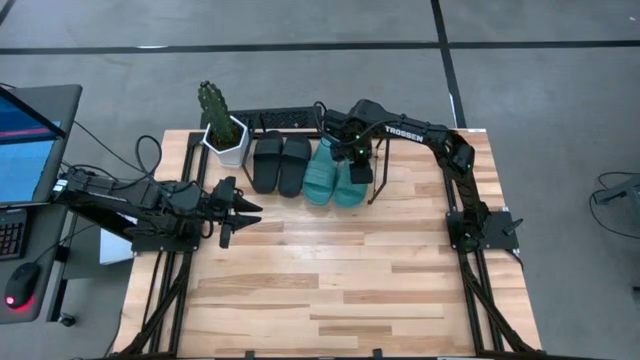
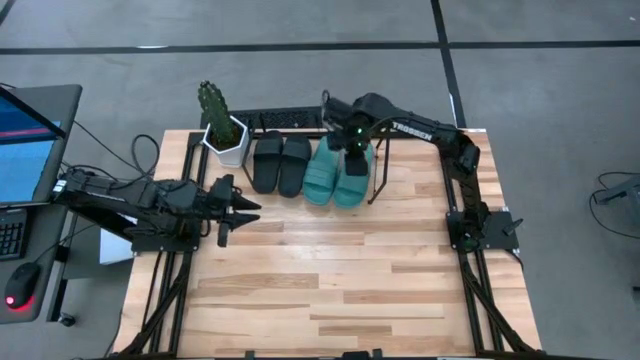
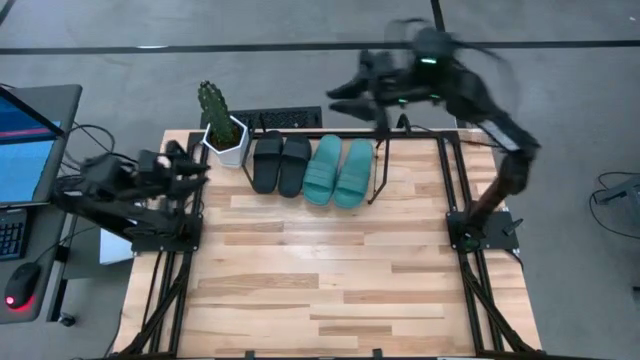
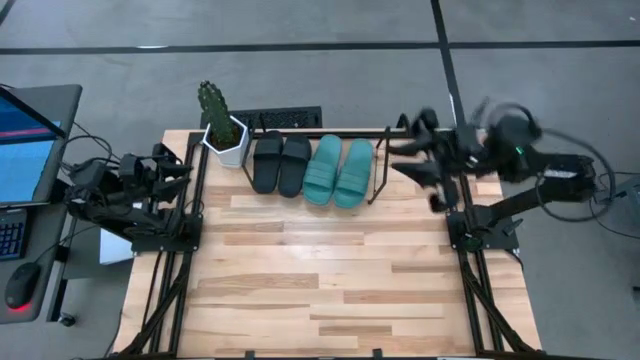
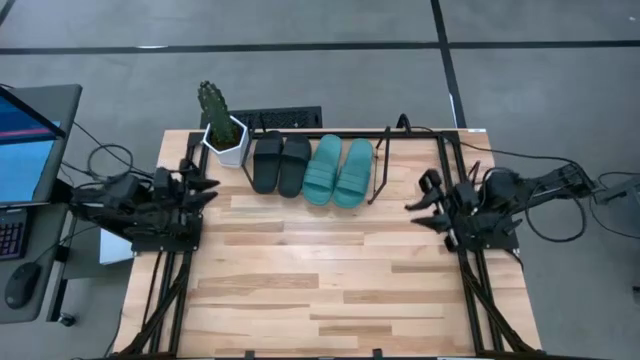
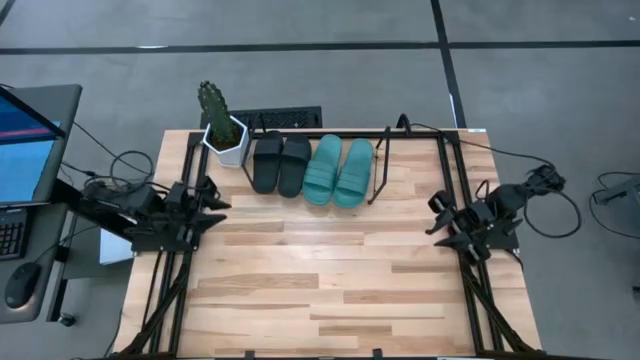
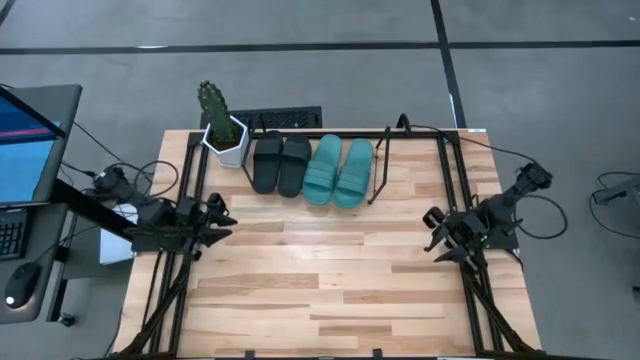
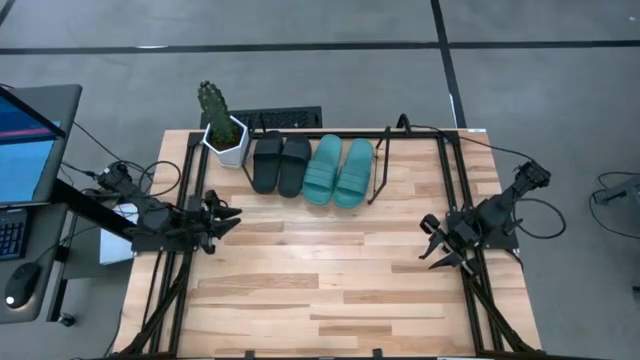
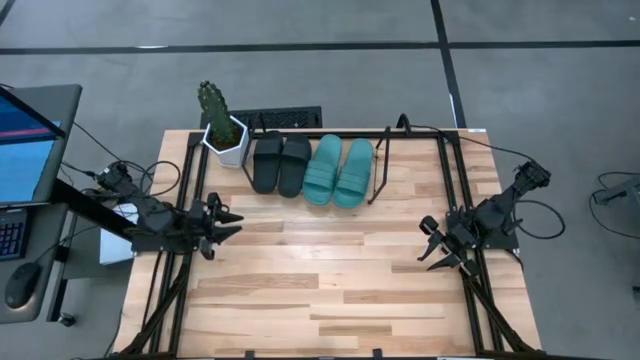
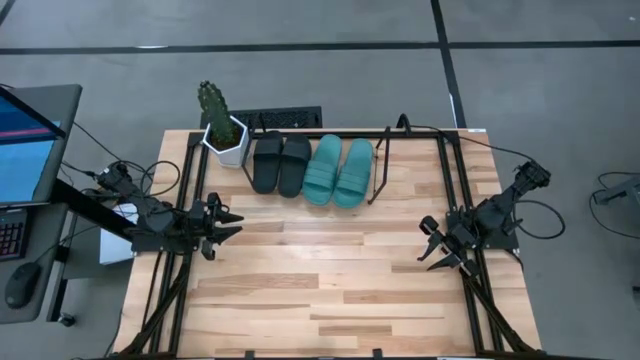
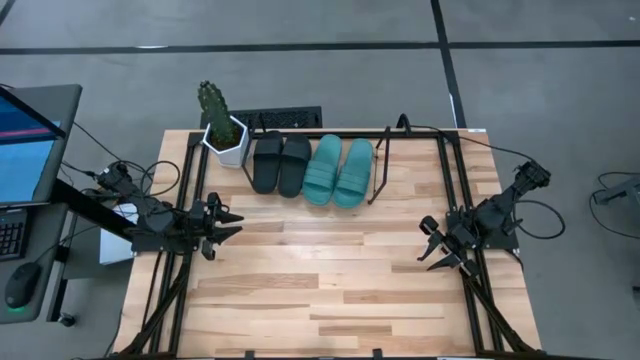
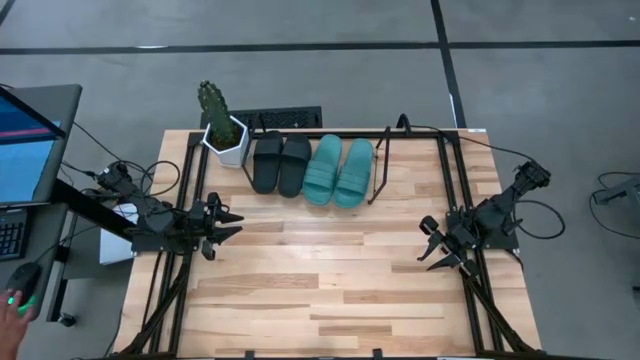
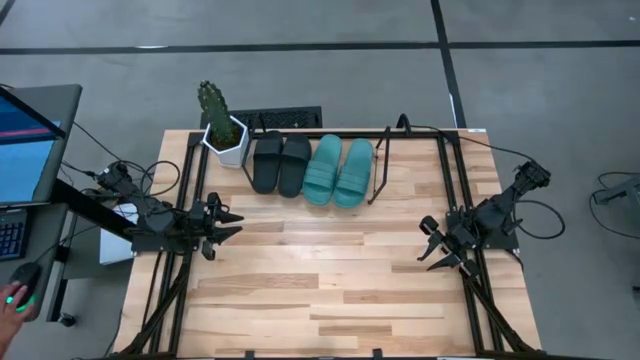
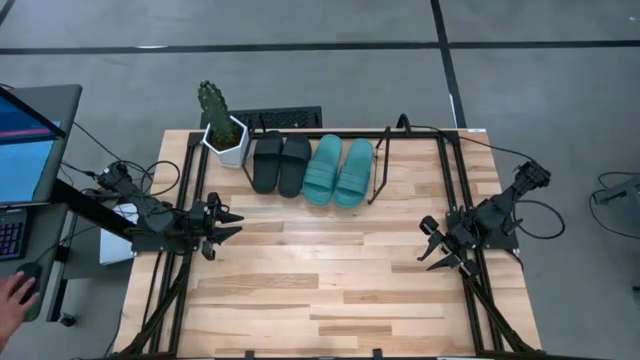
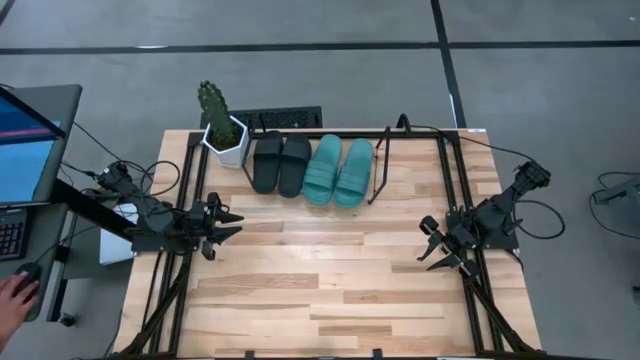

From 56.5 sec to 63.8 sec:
Task: Pick and place slides into the shelf
Return to Home Position

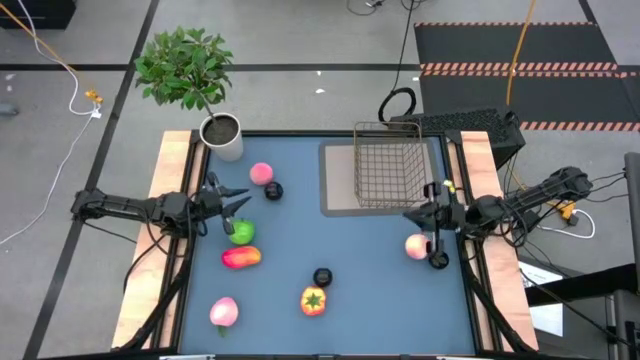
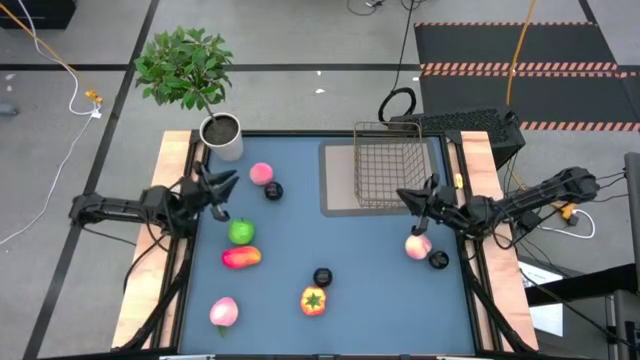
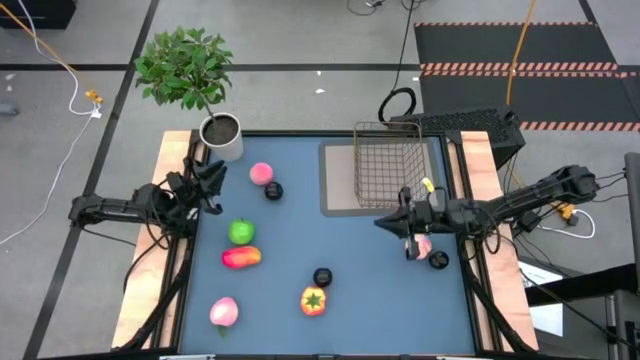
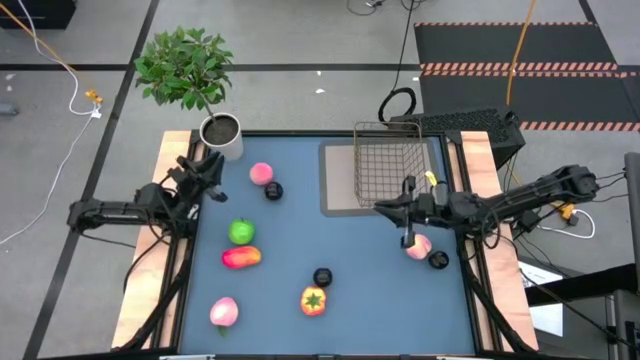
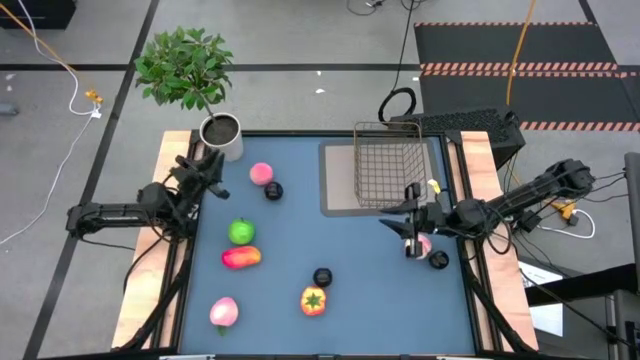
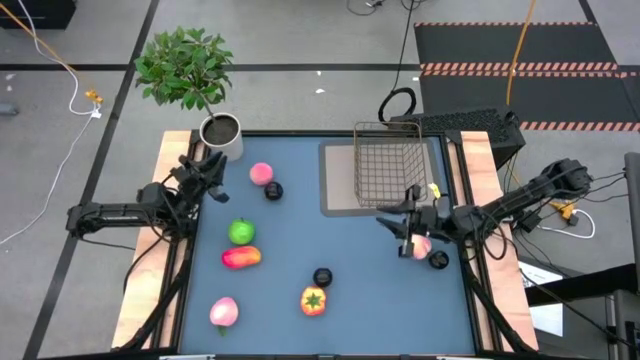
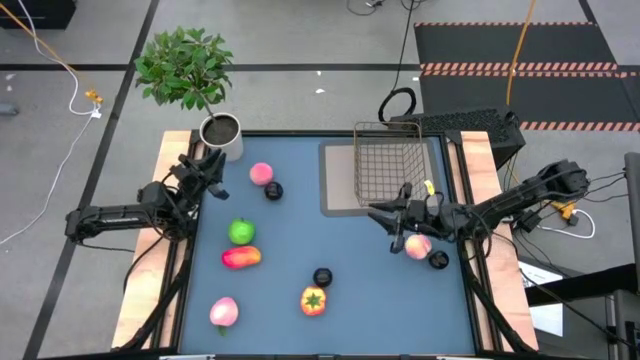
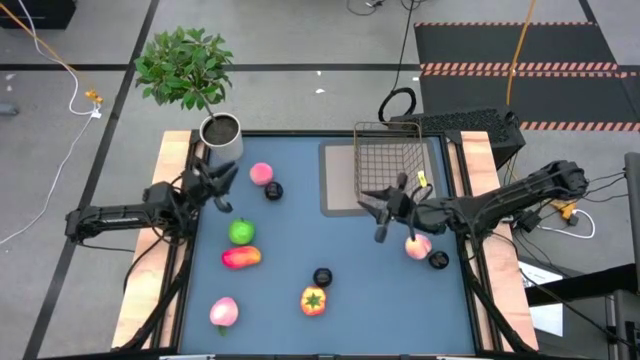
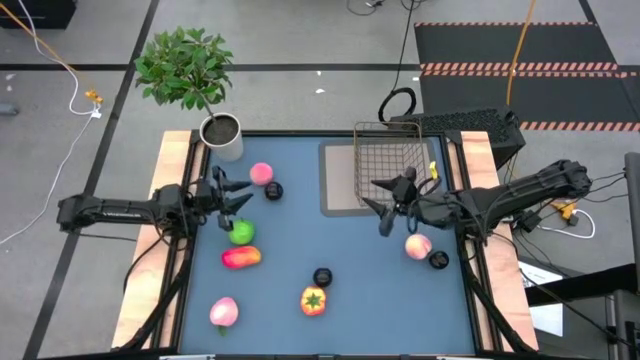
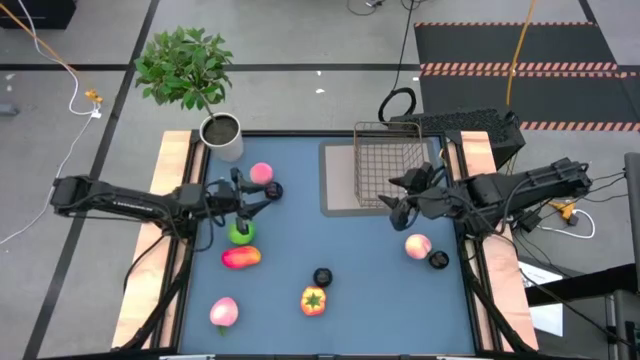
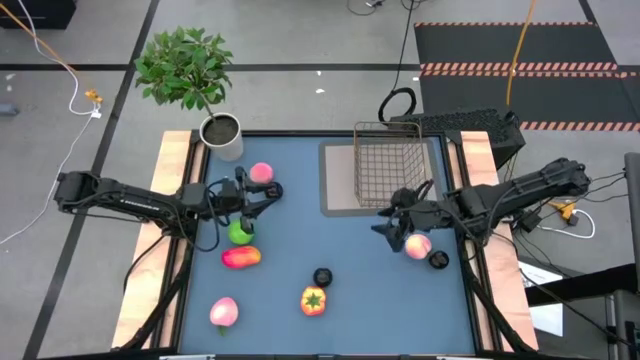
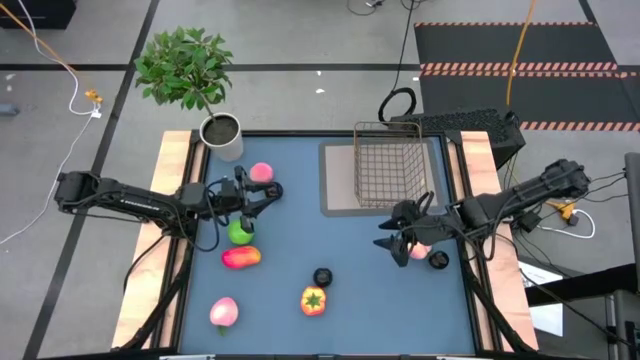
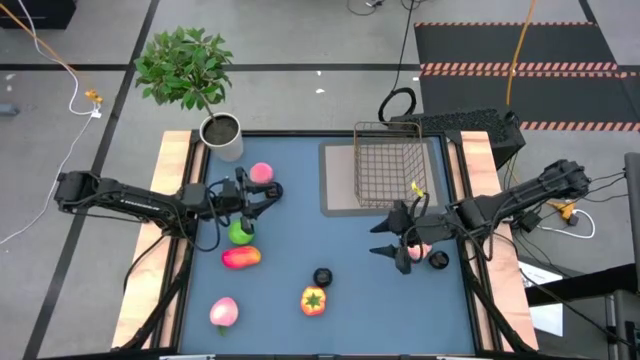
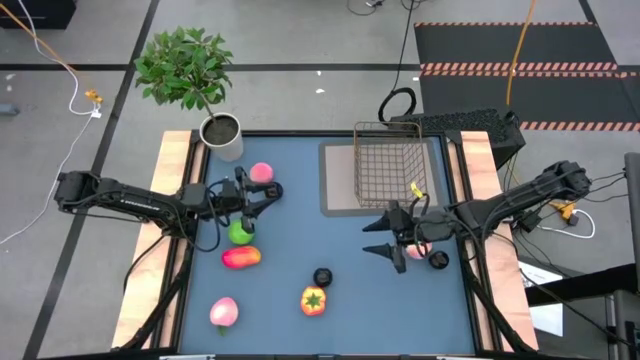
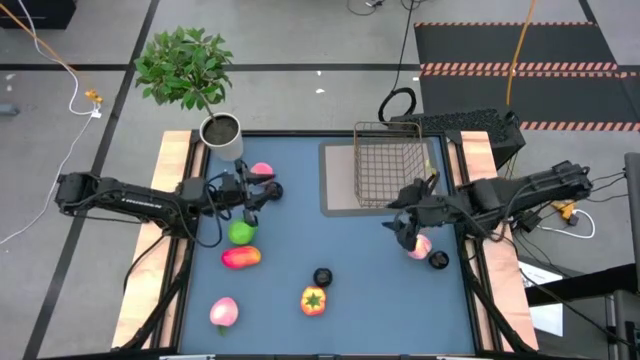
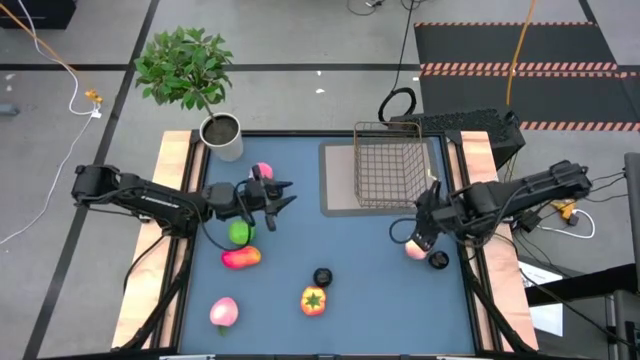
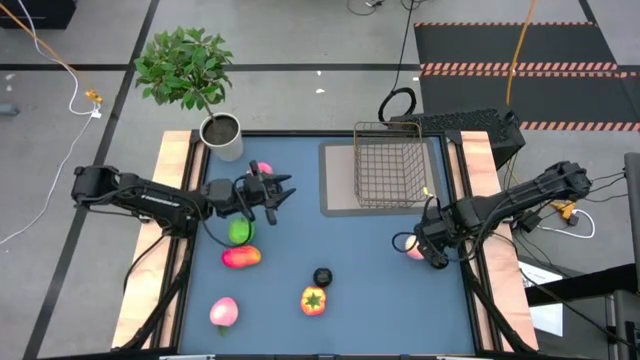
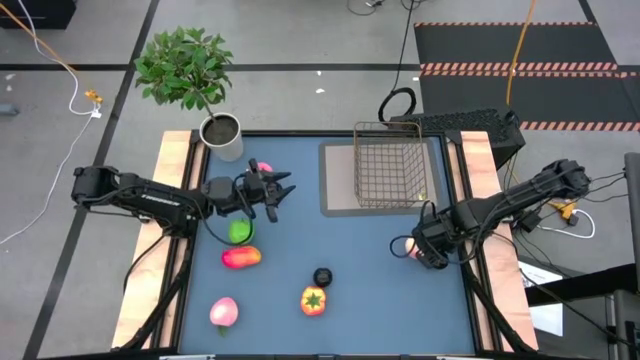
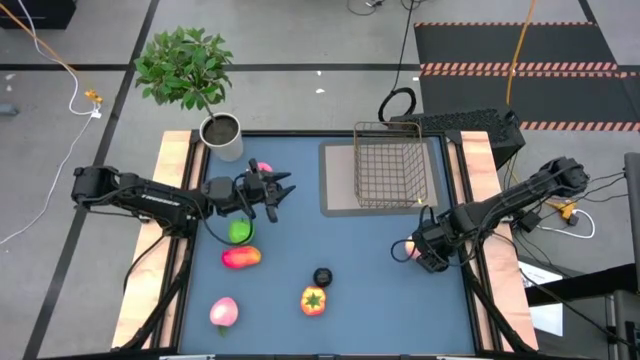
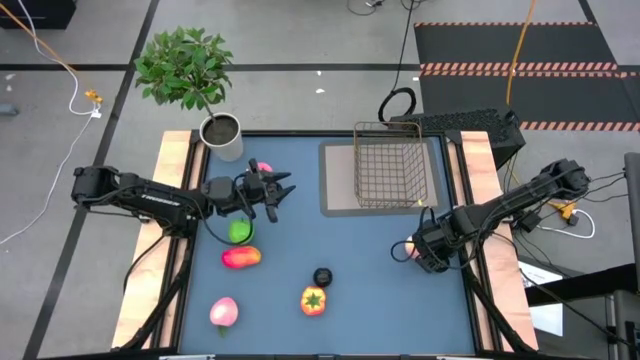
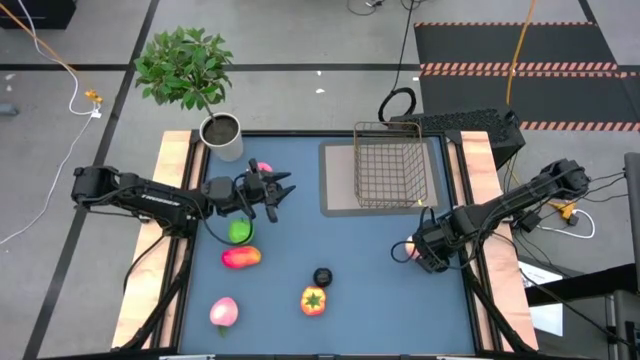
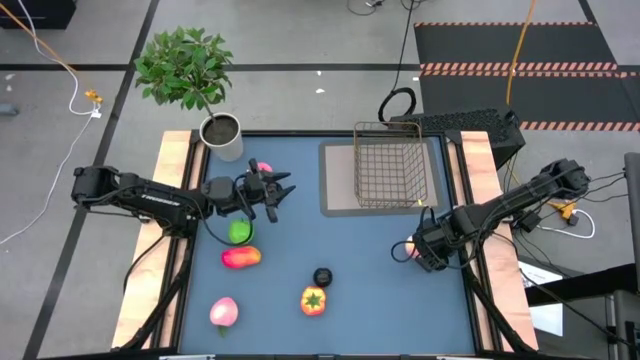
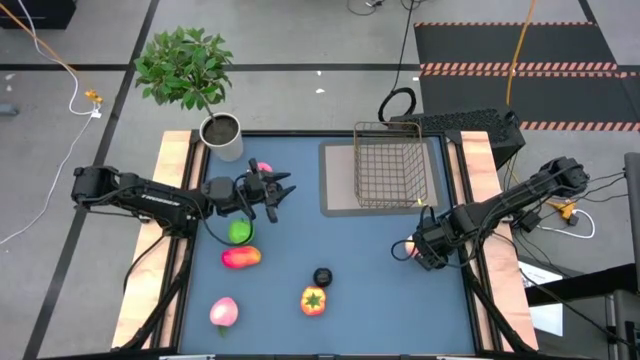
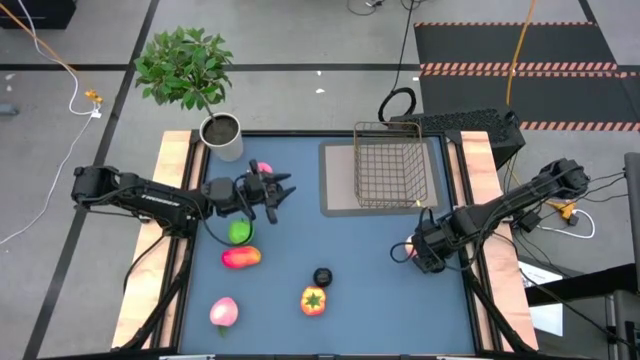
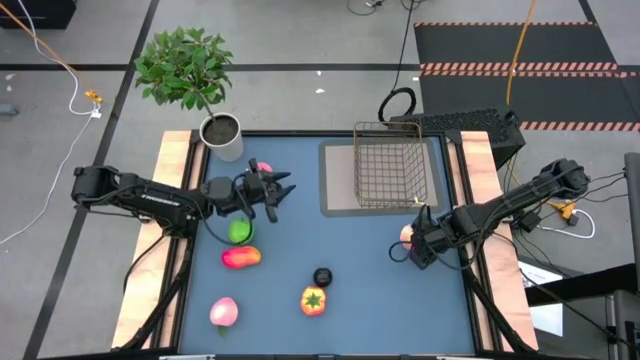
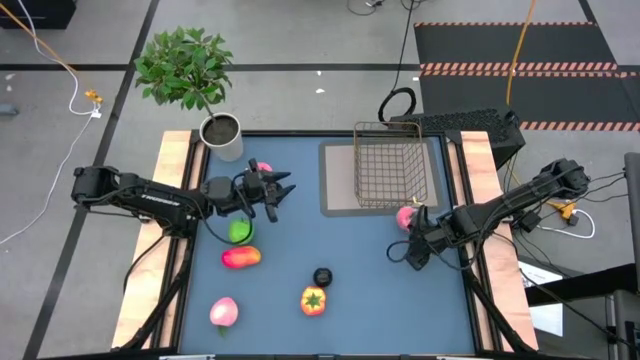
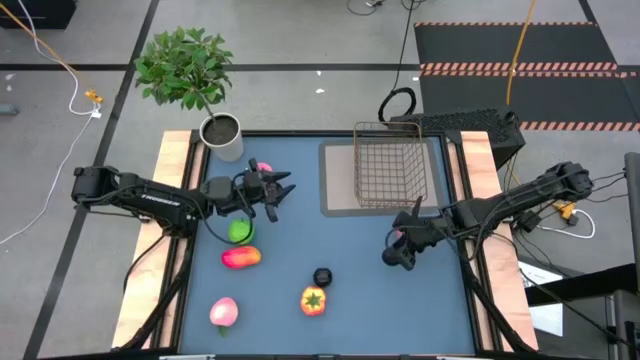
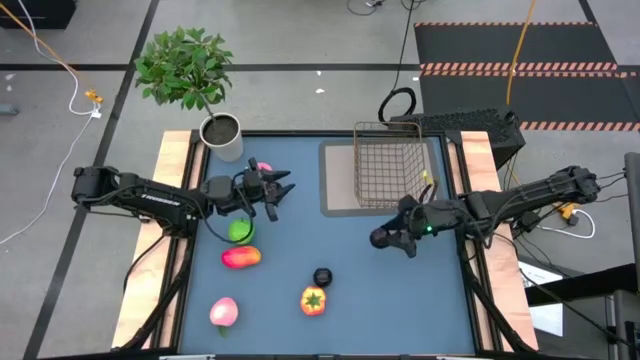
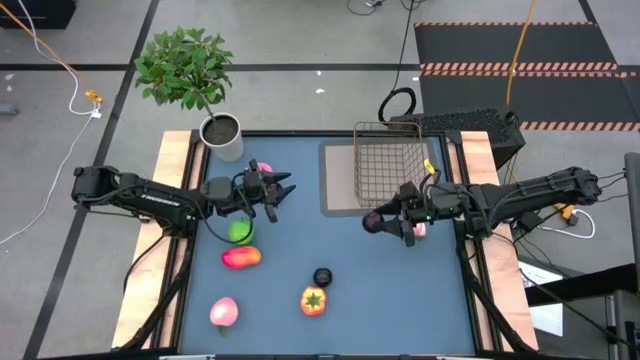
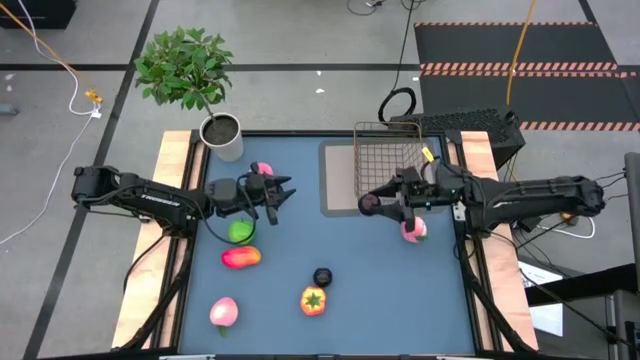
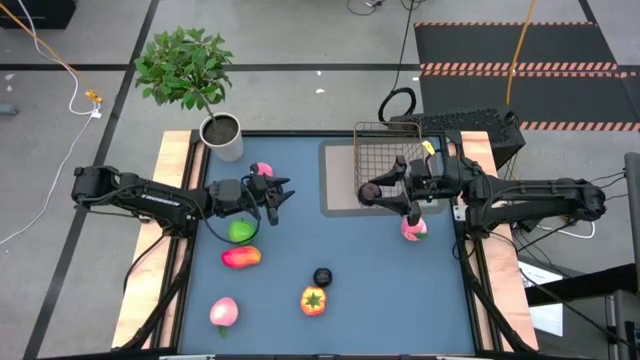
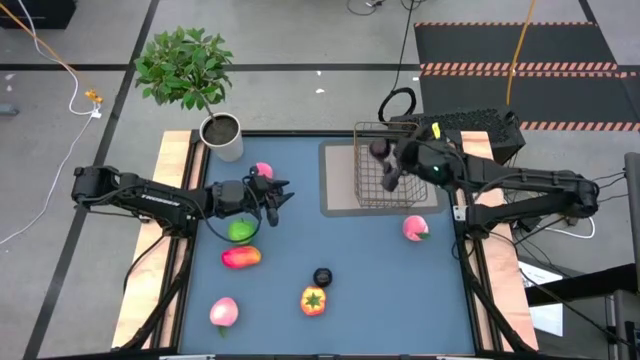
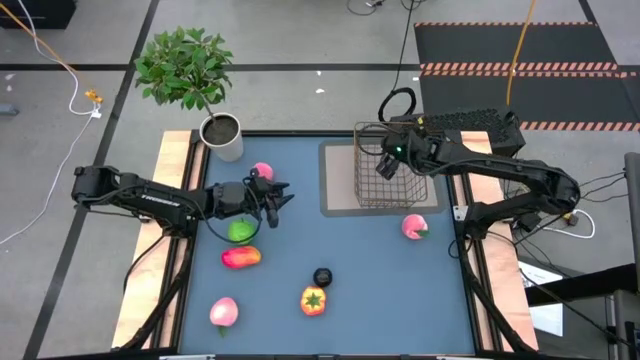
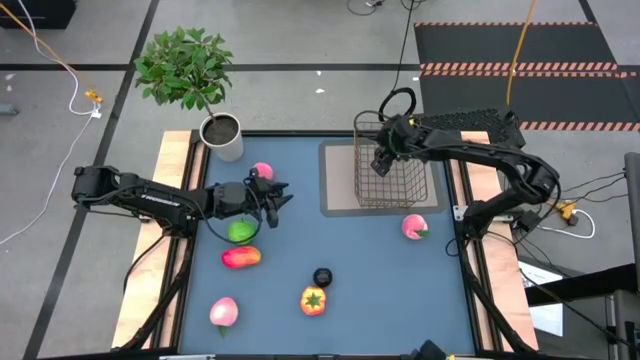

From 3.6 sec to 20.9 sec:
Task: Build produce basket
Put the bottom right black plum into the gold wire basket
